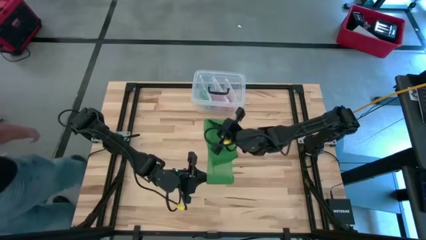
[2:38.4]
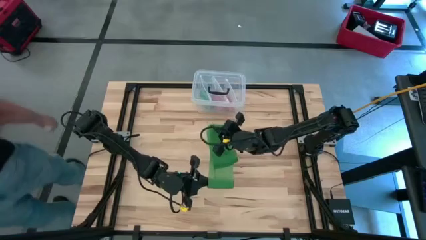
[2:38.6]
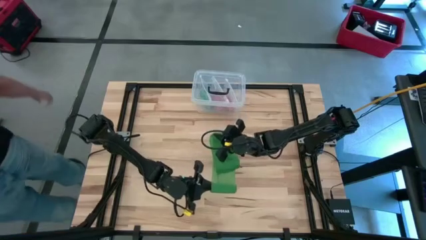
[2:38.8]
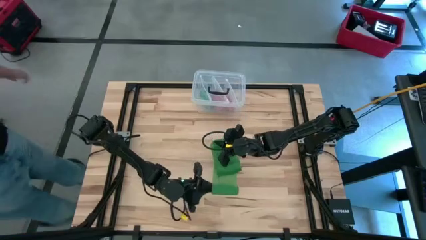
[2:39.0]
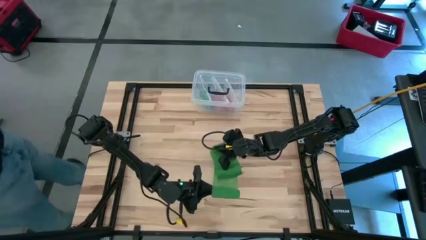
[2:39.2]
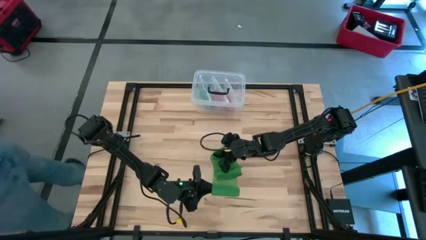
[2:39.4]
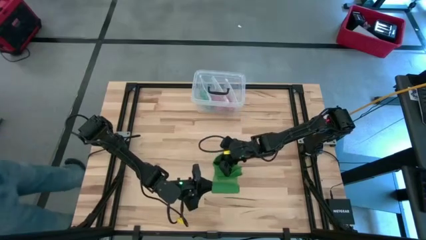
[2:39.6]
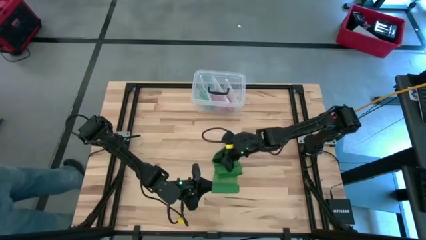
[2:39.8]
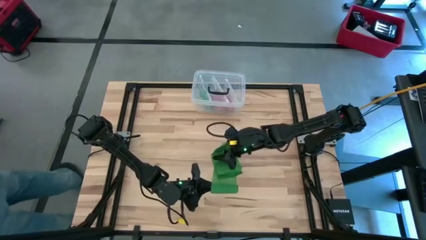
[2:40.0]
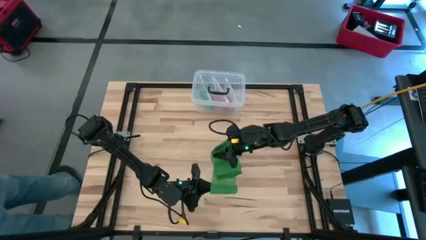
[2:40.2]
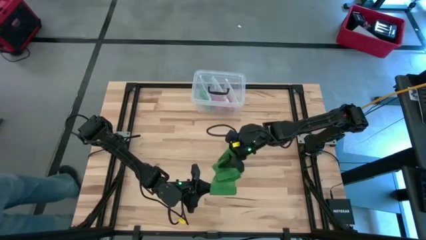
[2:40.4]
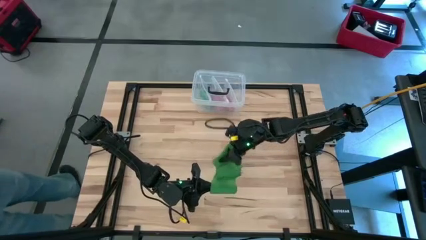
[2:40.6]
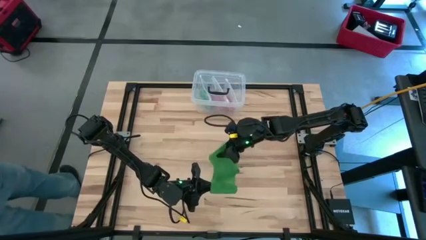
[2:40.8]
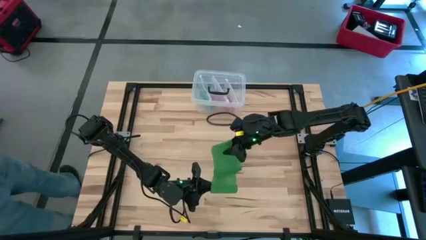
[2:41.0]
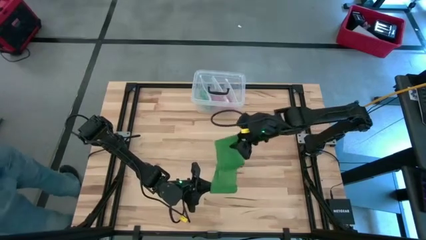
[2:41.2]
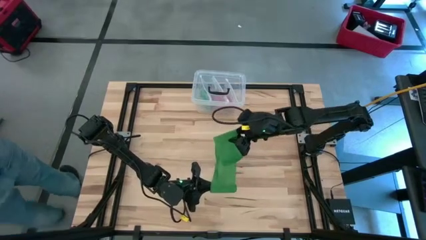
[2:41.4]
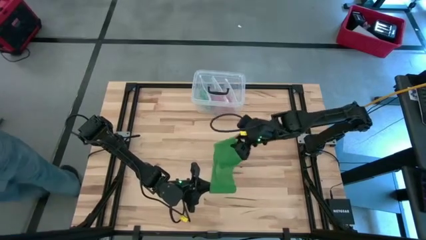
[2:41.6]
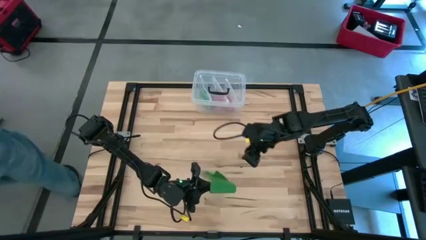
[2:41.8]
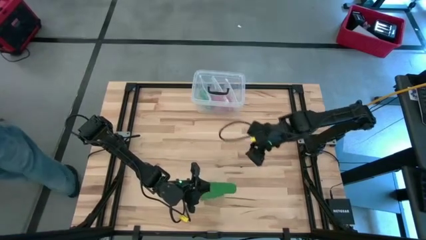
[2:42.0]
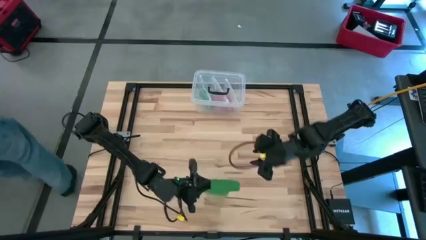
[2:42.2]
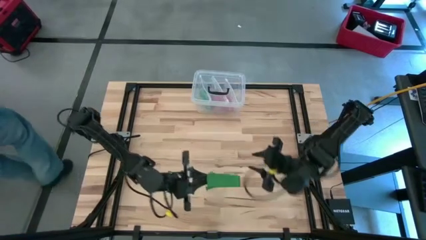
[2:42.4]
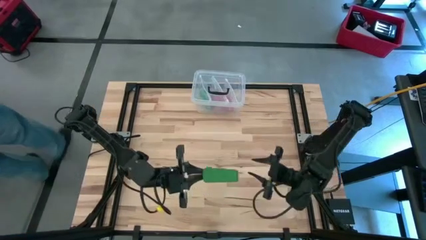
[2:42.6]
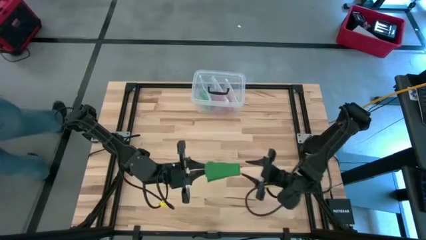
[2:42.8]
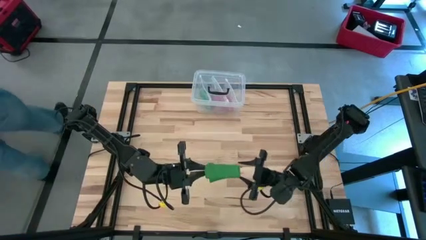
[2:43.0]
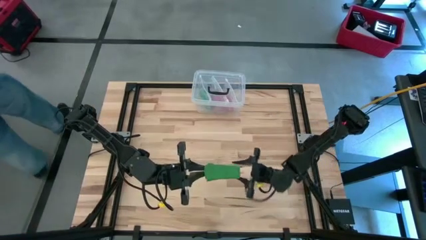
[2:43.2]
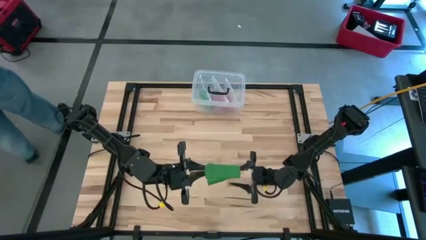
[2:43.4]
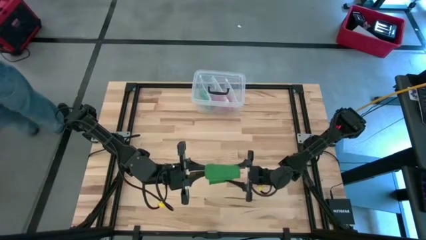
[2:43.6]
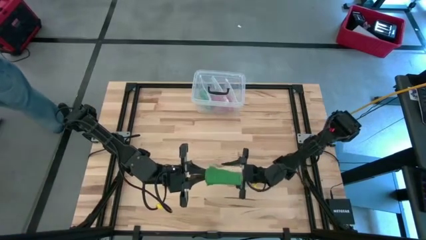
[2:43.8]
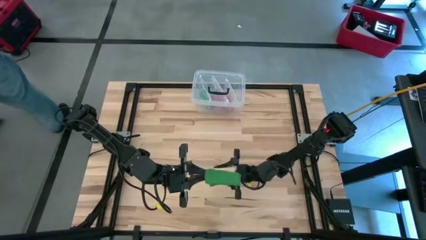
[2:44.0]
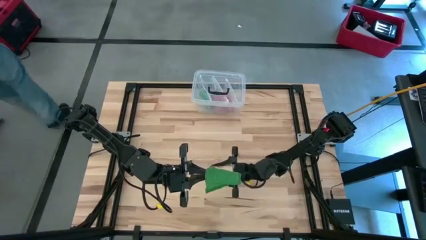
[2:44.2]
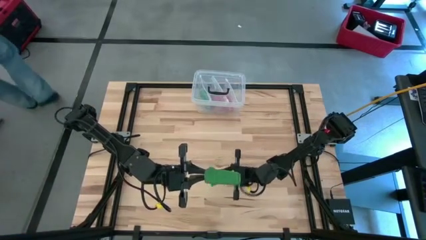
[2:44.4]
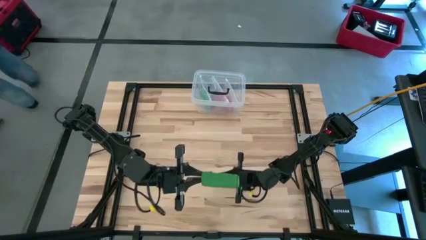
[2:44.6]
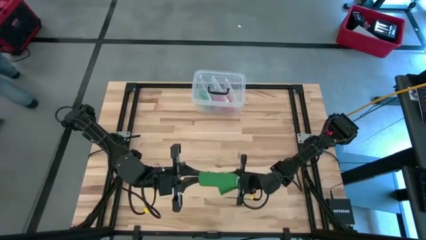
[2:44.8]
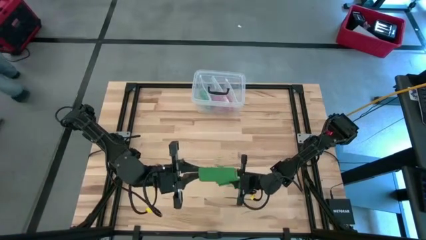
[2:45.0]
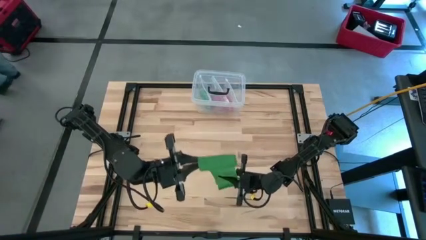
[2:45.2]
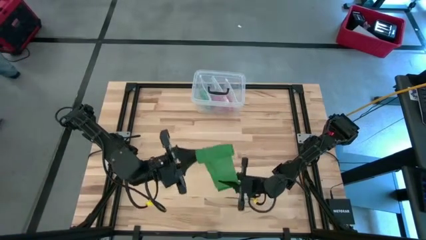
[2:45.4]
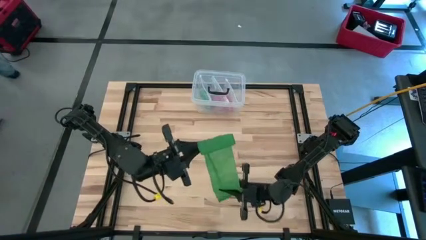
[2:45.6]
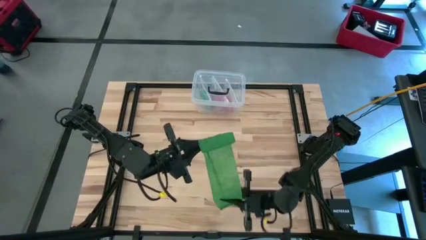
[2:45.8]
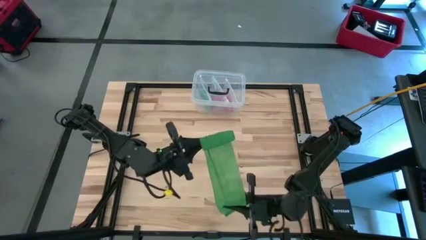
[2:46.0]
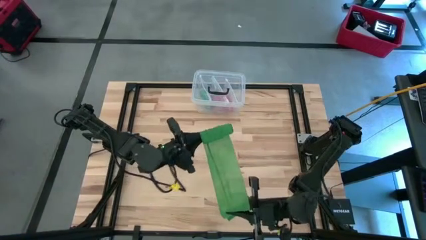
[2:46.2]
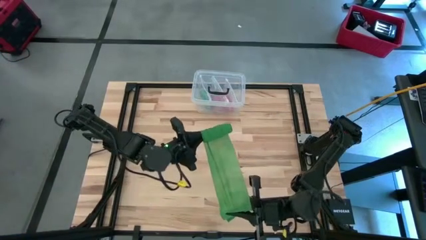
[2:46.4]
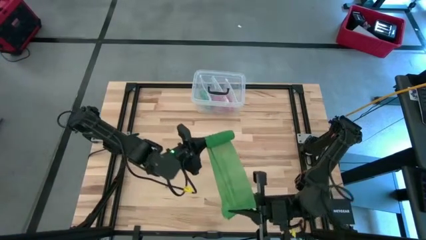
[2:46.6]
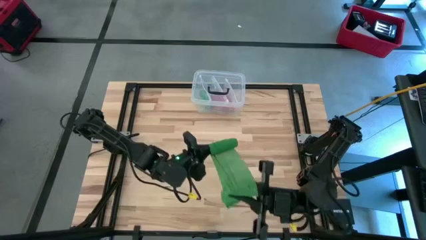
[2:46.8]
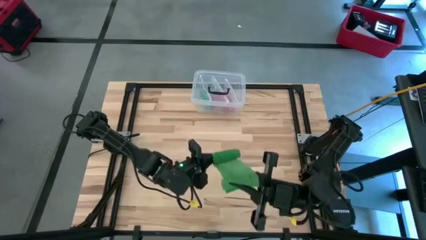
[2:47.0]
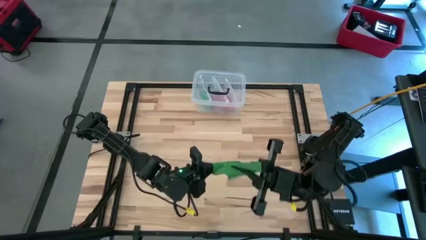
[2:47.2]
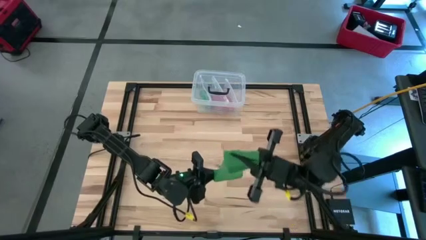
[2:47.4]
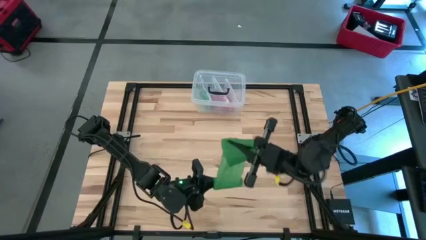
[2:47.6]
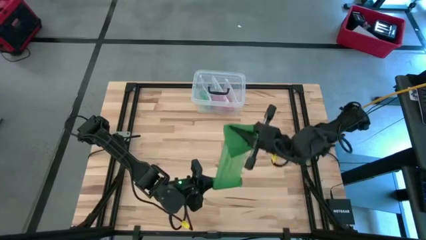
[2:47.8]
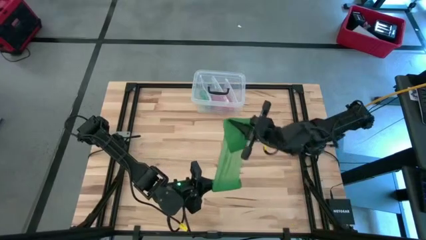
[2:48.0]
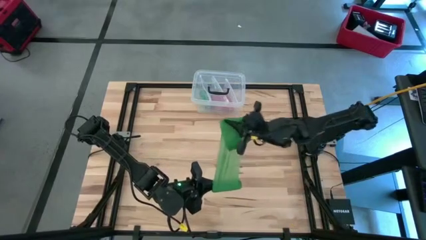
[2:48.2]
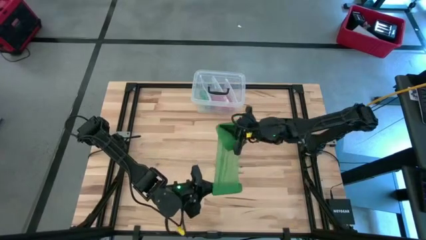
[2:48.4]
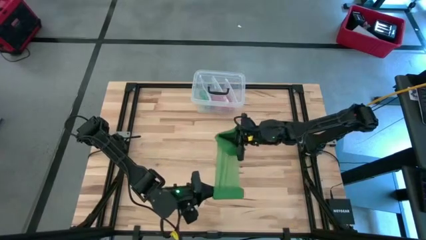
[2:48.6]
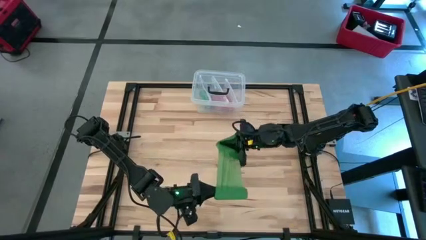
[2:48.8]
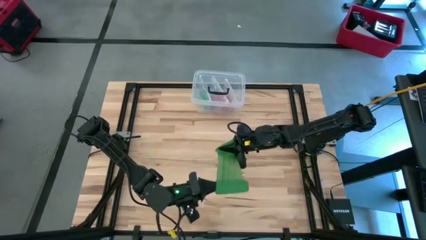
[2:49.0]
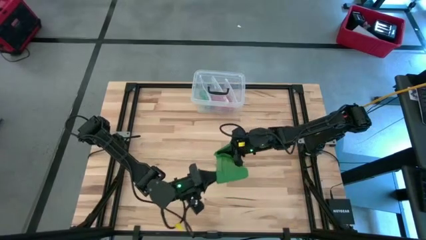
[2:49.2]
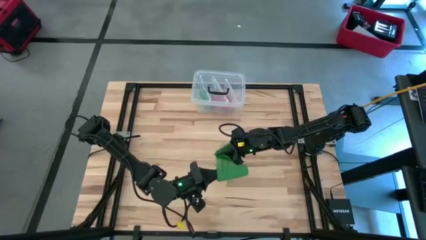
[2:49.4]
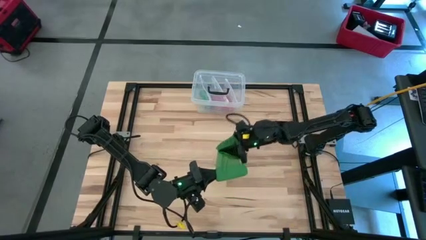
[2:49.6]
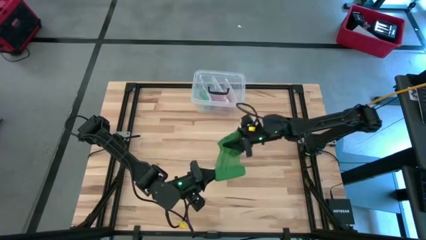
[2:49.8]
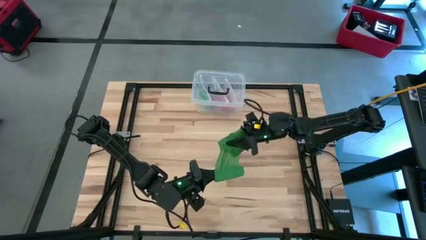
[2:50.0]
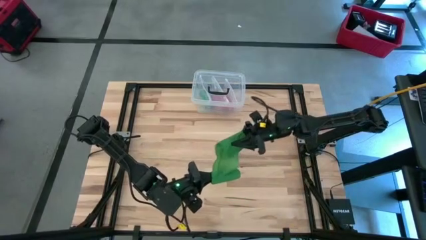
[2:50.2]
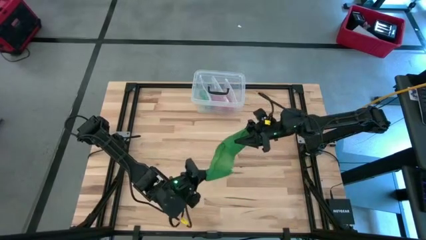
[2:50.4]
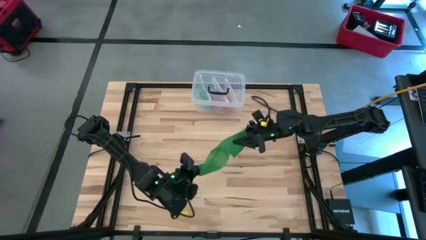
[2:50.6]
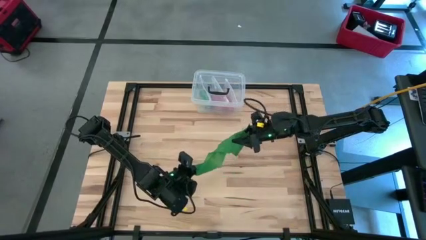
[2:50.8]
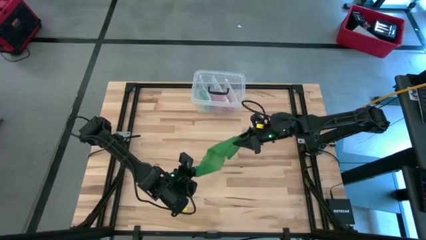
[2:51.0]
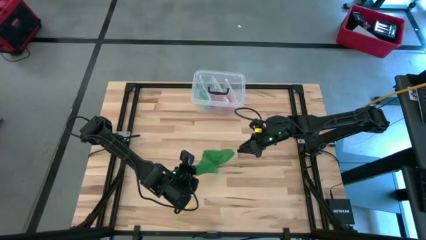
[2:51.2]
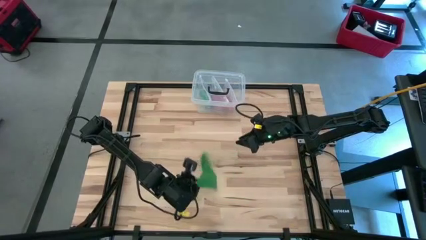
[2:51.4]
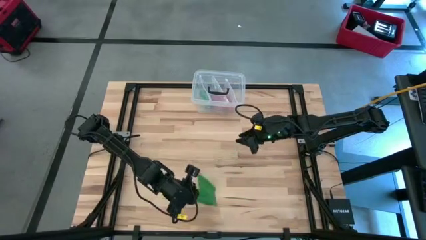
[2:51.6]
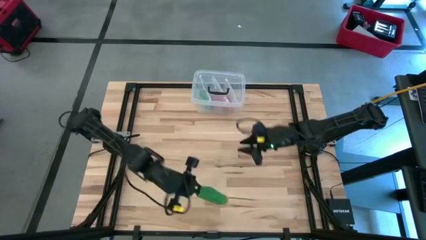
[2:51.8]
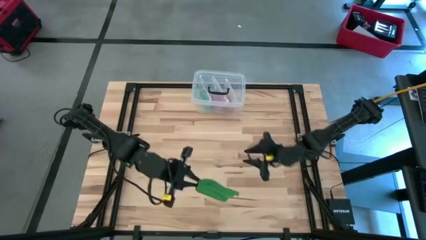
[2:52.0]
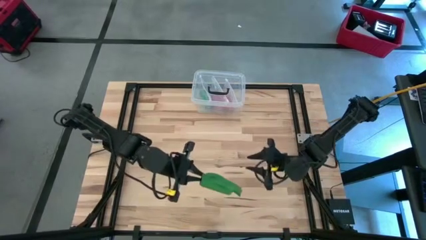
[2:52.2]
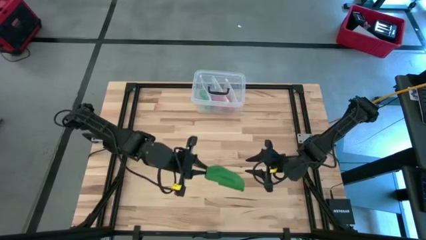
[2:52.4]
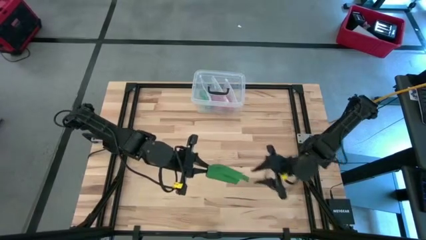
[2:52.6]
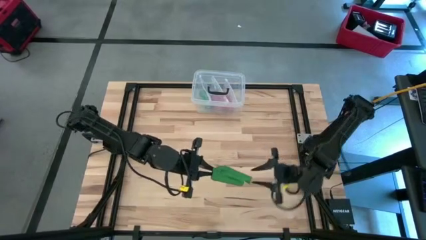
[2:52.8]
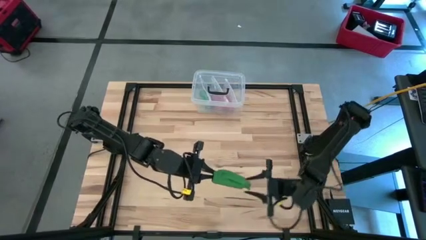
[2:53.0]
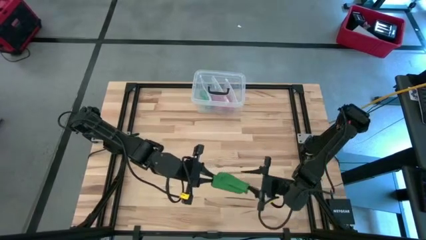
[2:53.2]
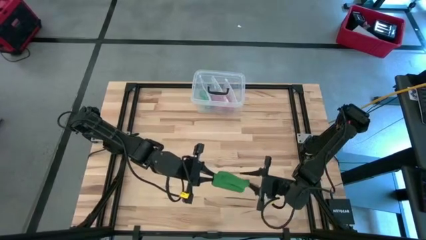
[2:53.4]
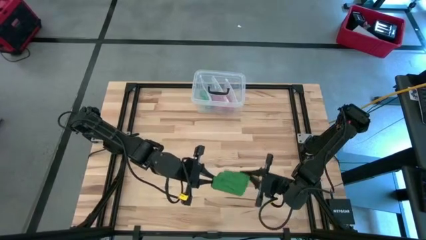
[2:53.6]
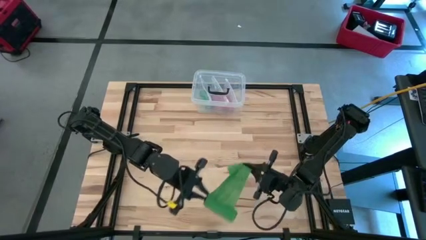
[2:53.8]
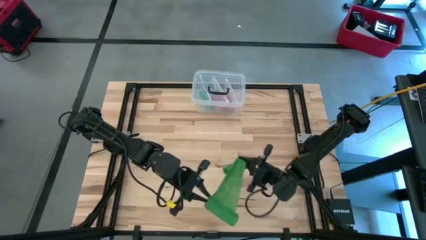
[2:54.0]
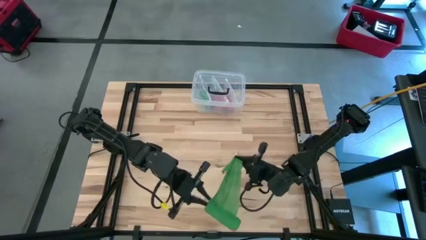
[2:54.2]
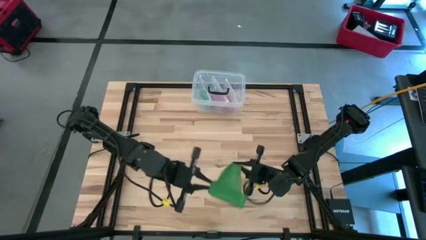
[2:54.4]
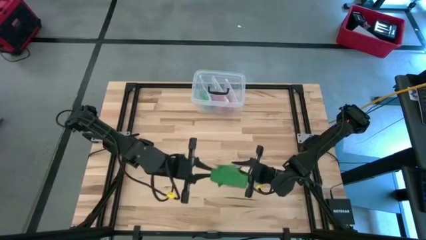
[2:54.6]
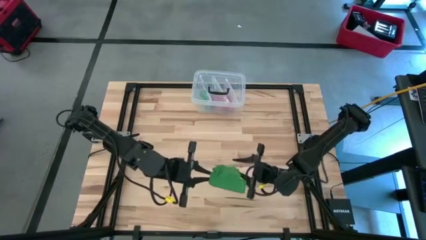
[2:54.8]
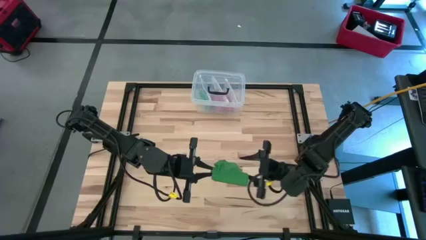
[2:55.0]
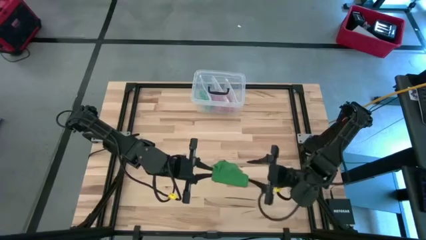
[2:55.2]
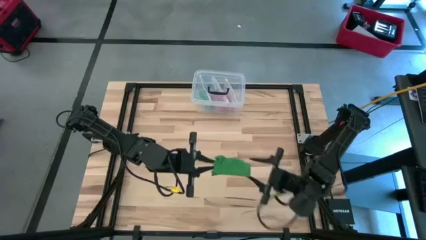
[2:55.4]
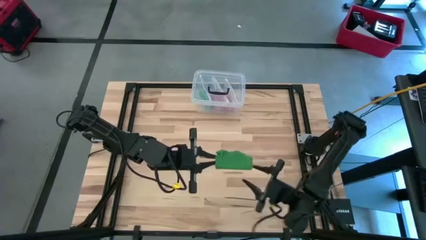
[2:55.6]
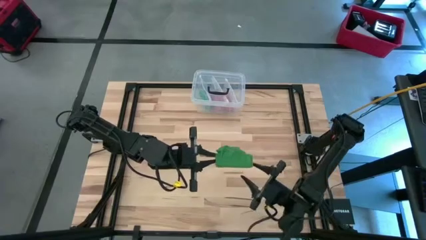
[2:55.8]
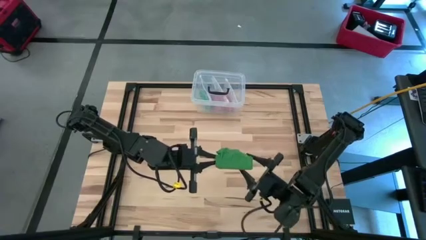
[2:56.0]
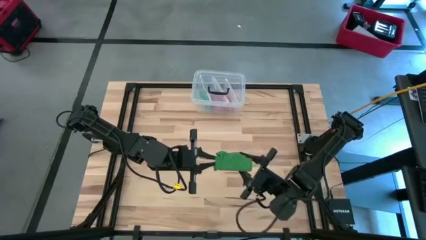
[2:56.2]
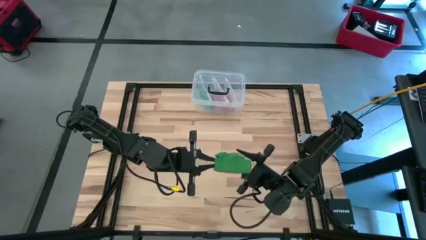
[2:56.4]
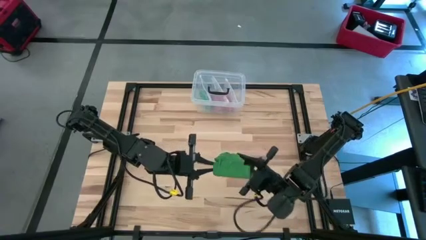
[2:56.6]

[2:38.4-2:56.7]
Task: Roll bandage
Roll the green bandage
